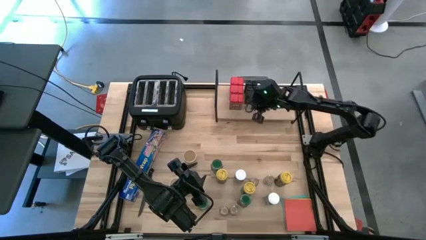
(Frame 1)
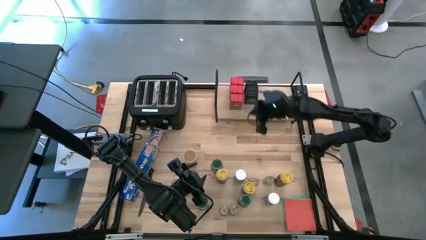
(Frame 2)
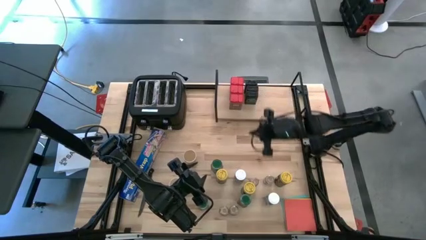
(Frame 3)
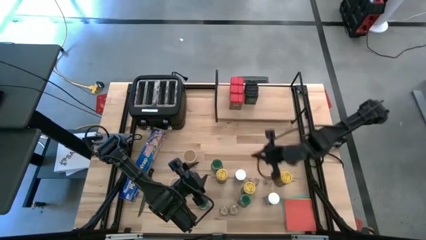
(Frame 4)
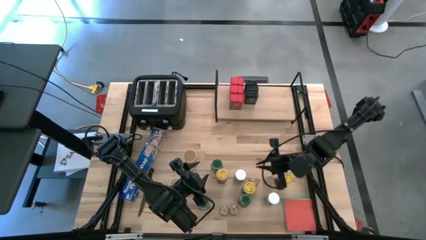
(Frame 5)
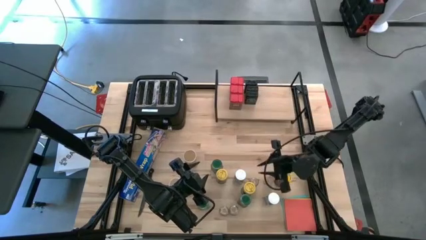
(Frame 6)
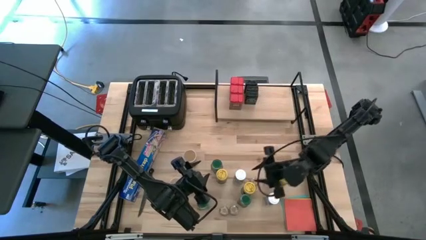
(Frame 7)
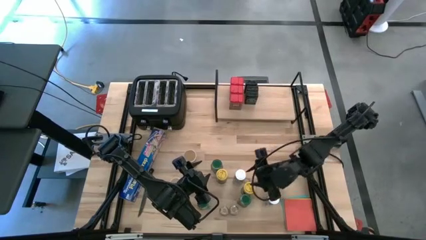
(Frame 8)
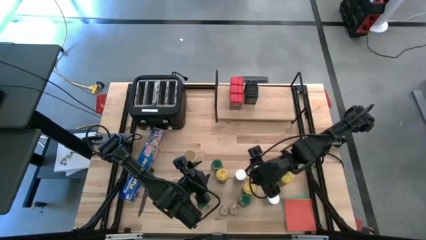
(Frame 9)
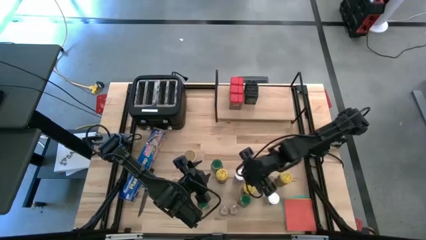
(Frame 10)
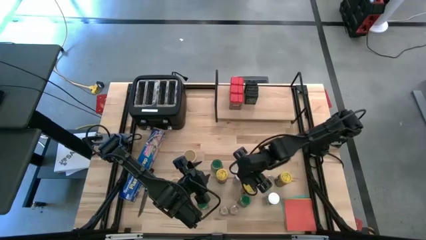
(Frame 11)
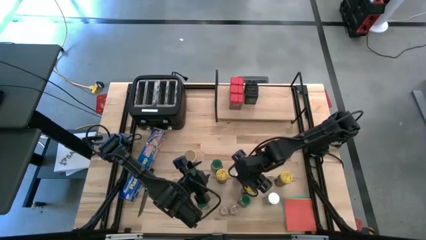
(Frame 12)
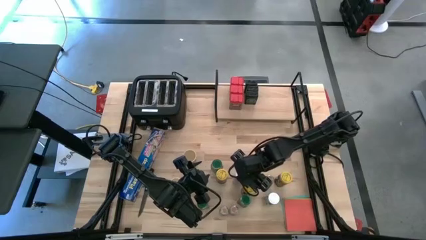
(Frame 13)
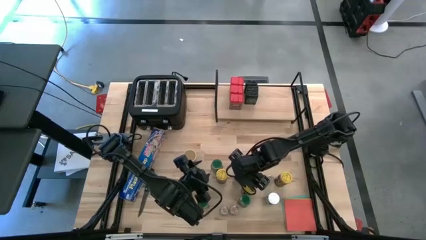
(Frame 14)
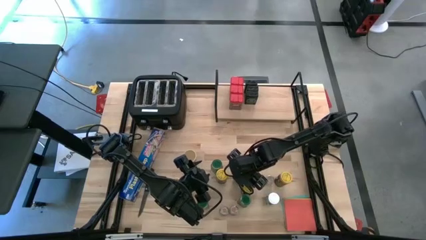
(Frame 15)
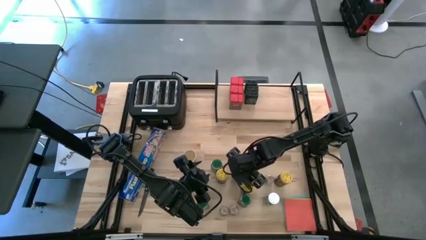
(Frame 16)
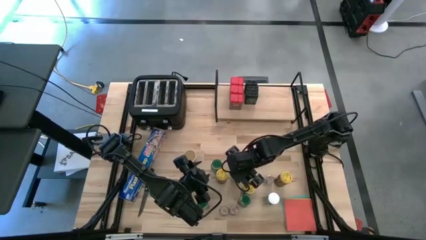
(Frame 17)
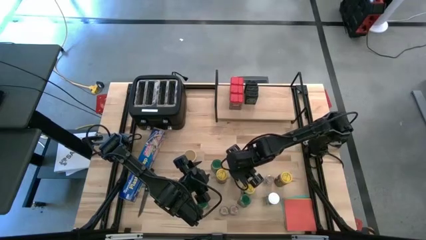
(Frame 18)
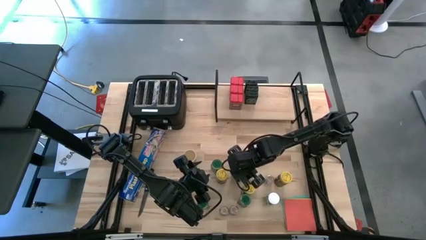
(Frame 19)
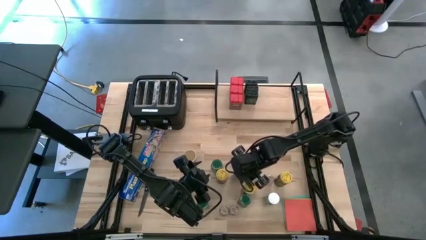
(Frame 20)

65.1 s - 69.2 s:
Task: Shelf spices
Put the top left white seasoning bottle on the shelf

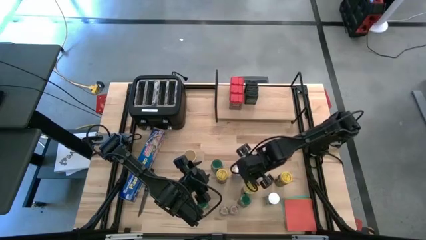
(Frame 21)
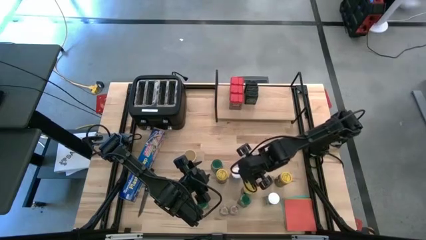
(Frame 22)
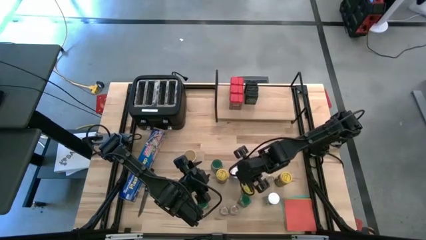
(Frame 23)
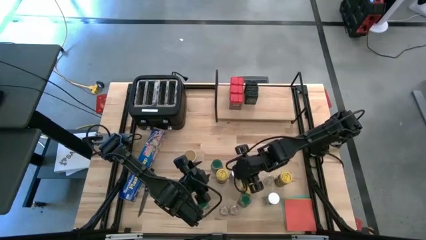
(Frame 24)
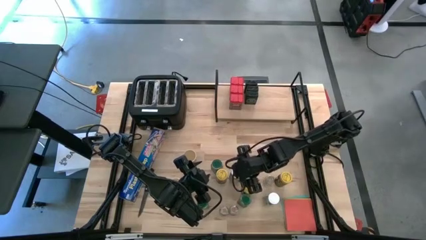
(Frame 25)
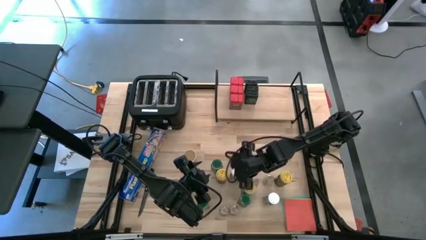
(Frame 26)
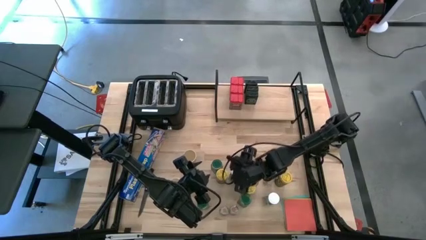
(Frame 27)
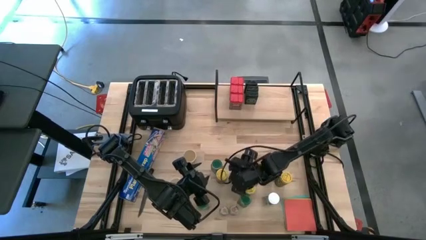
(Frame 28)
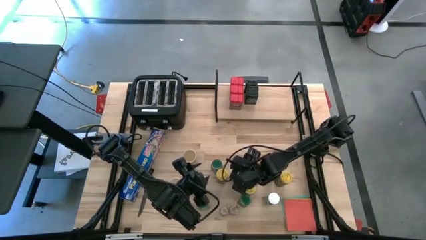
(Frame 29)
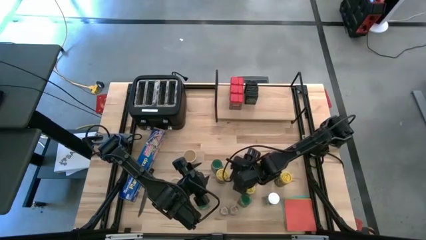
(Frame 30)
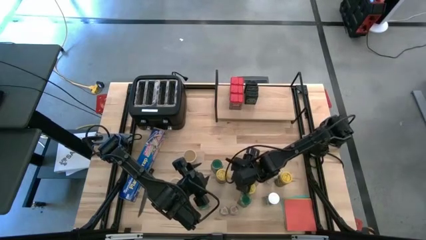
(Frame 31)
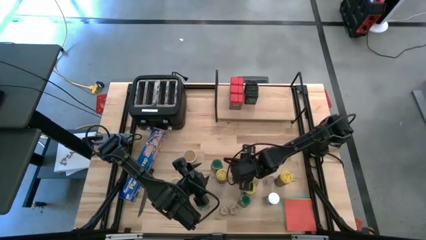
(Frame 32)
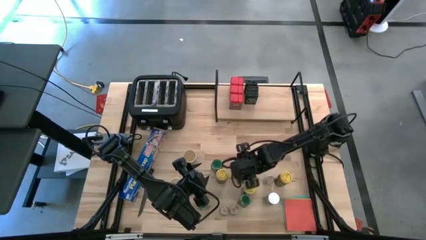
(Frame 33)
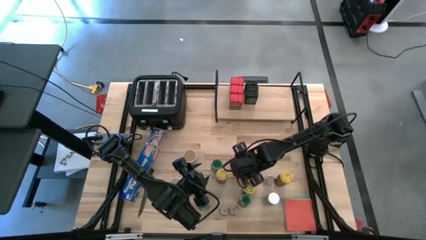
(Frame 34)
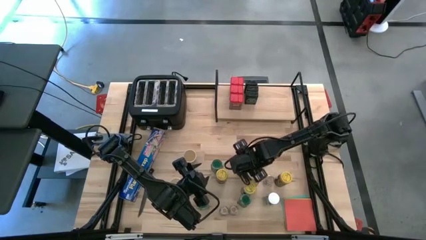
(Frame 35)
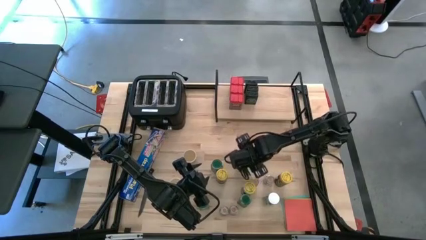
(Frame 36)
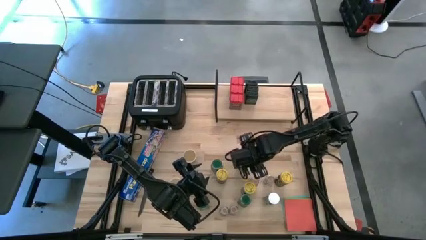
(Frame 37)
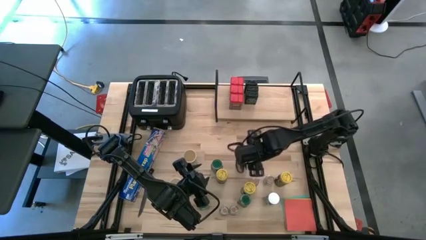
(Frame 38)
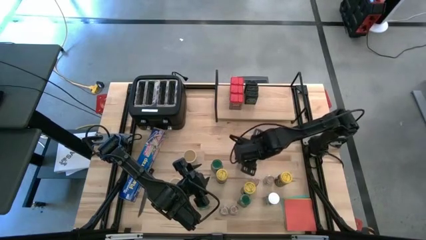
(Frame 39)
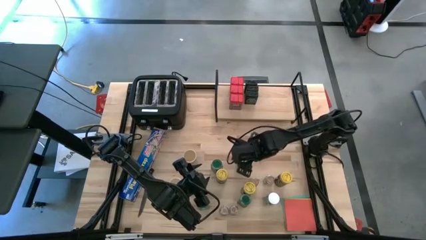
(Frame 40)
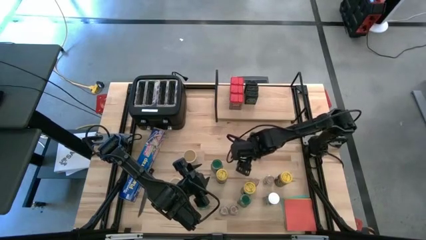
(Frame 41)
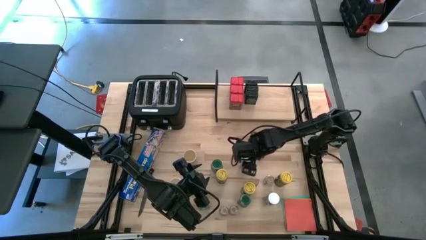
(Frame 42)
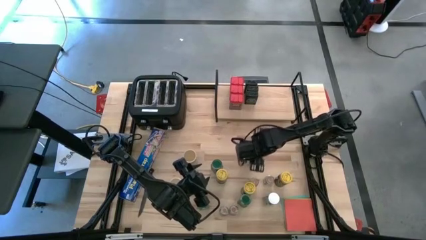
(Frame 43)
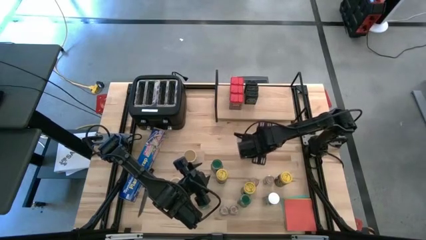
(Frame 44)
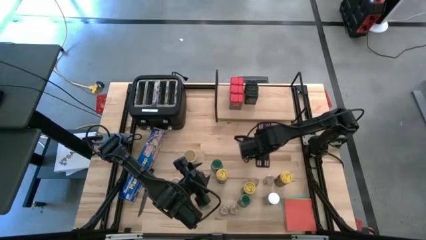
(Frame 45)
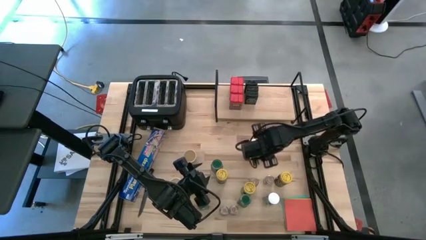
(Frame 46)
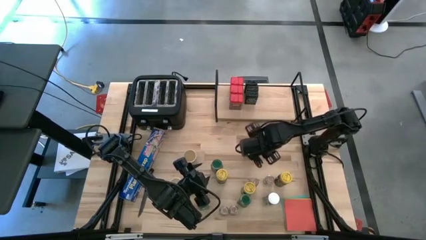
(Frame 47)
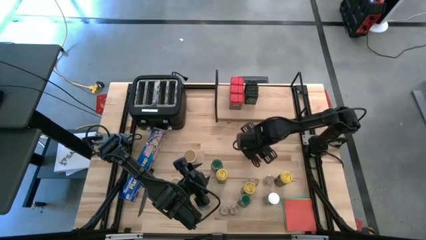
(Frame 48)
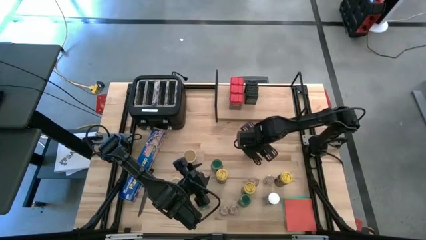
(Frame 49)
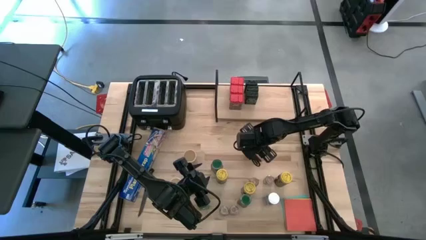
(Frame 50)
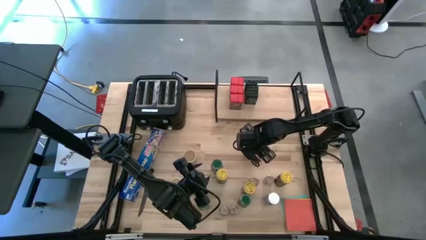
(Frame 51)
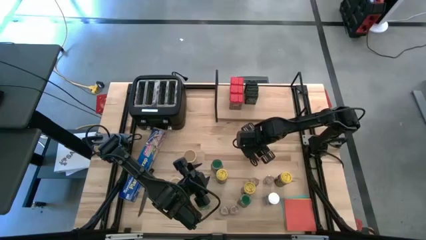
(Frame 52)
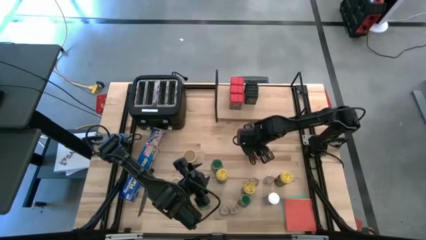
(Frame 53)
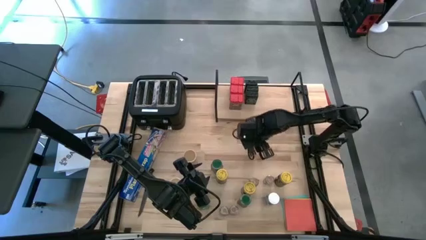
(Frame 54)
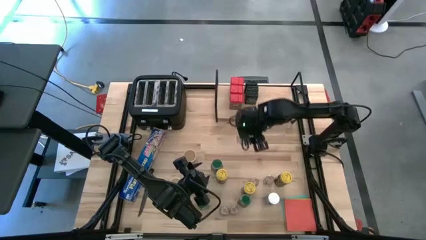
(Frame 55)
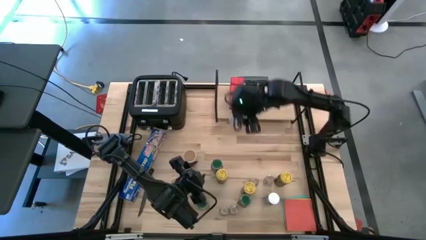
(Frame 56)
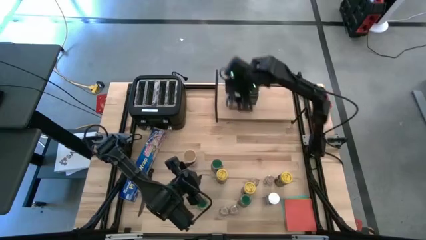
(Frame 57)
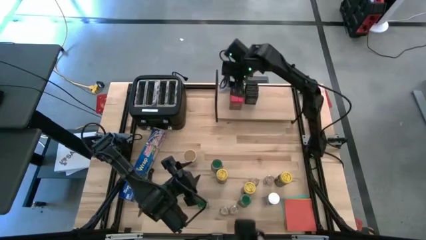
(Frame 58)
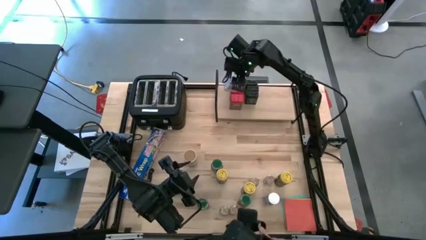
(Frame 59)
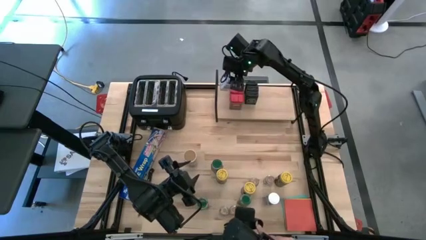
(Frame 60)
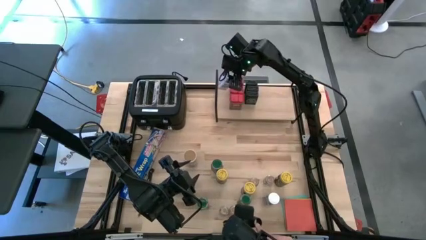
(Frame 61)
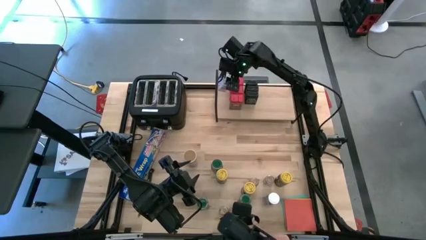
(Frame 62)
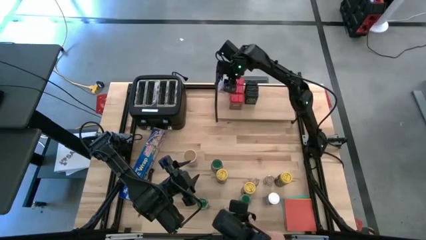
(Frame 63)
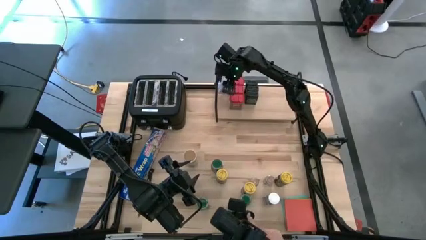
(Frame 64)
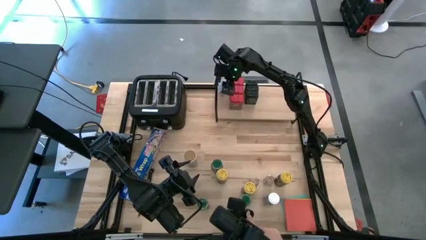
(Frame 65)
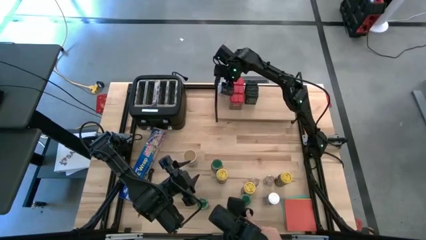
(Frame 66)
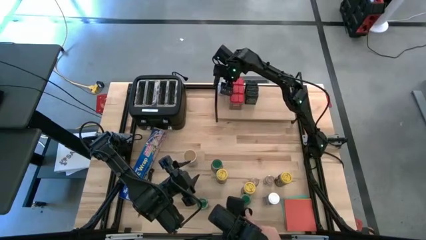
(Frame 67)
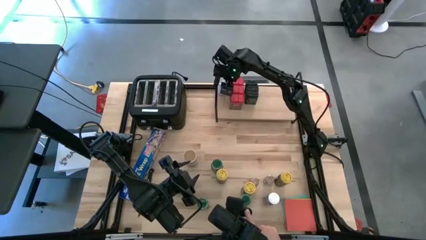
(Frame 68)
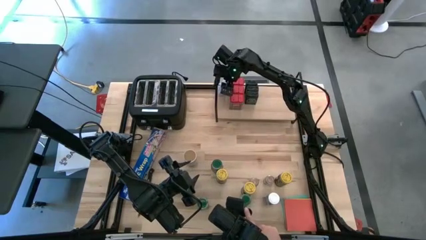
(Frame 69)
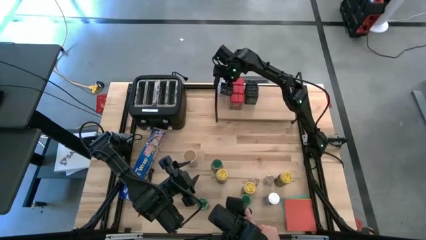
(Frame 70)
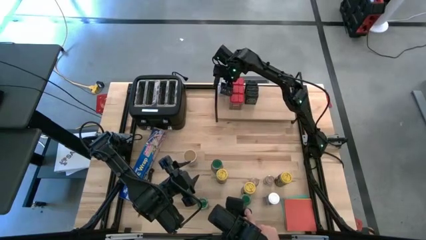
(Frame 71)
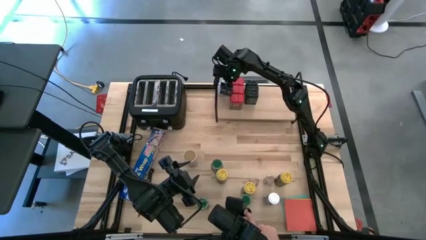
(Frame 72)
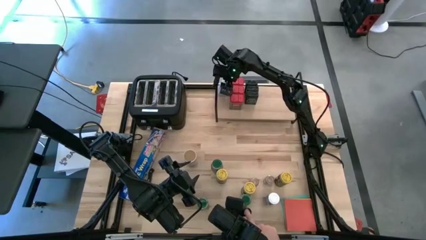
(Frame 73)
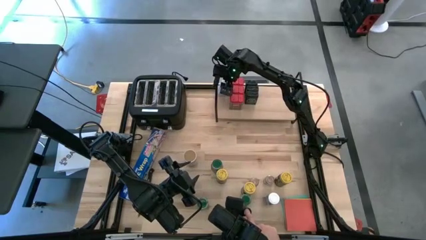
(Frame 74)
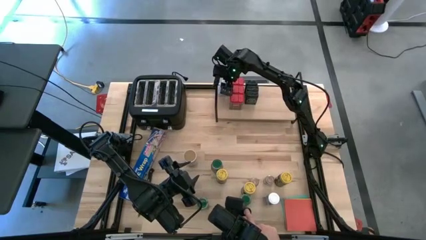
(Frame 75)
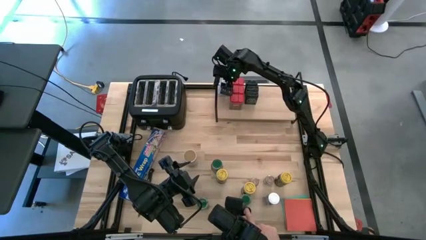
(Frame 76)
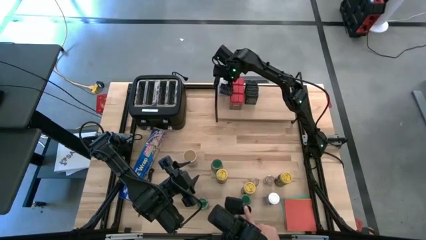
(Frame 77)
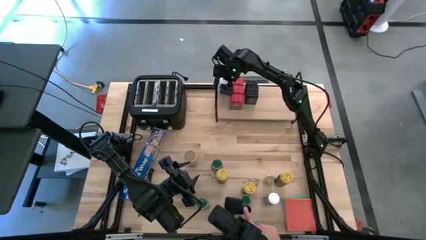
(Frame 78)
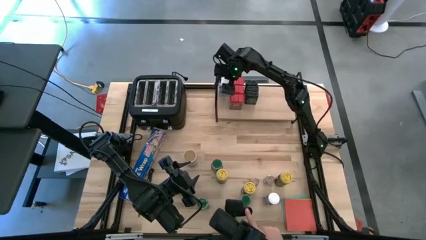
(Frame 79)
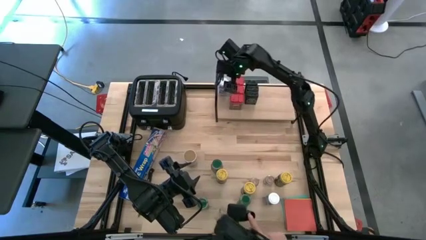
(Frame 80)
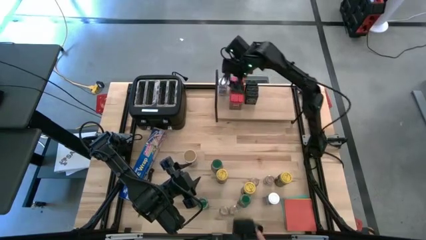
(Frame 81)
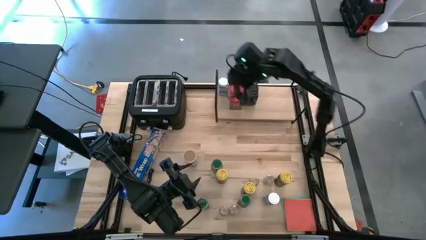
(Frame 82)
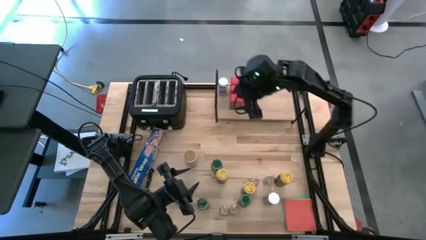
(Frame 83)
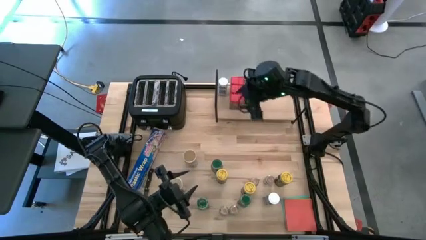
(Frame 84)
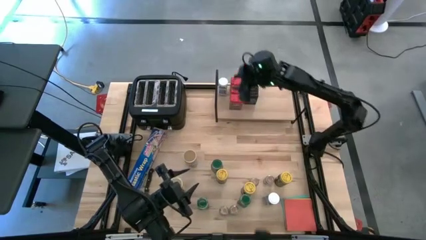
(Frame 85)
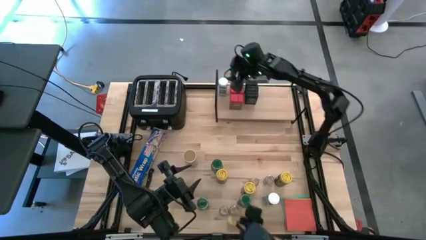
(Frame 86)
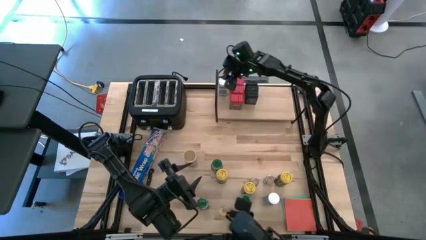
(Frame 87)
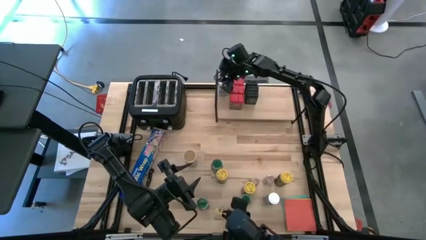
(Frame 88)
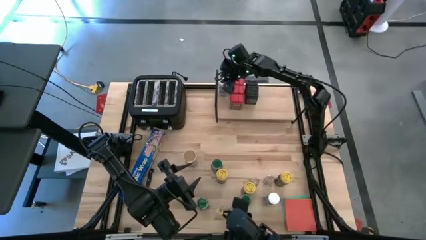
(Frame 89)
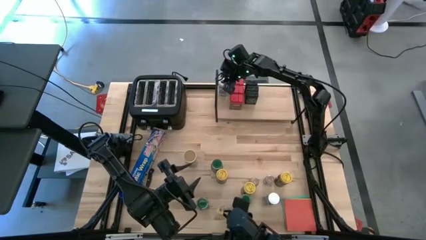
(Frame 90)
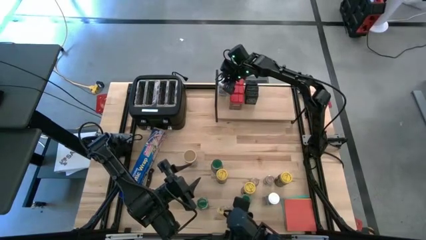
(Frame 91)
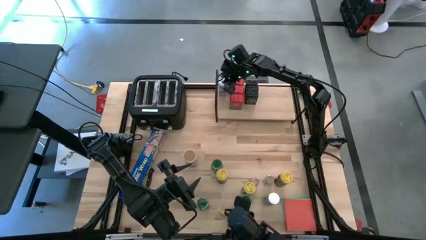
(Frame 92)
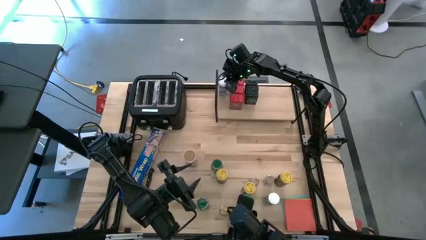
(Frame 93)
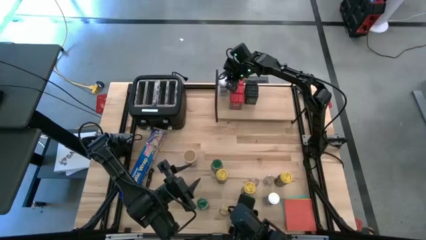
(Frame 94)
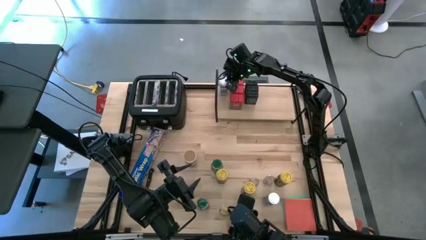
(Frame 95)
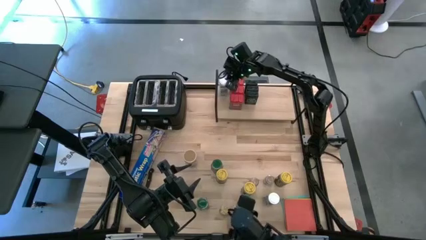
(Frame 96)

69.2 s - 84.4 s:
Put the top left white seasoning bottle on the shelf
